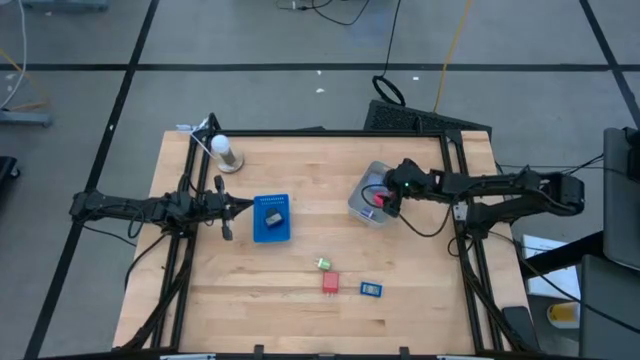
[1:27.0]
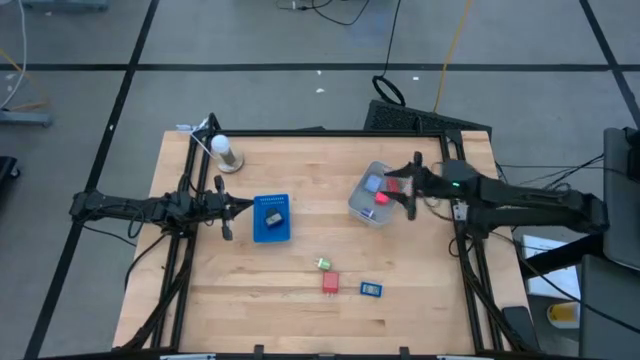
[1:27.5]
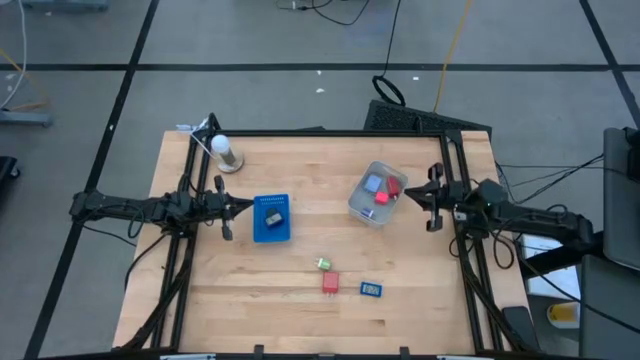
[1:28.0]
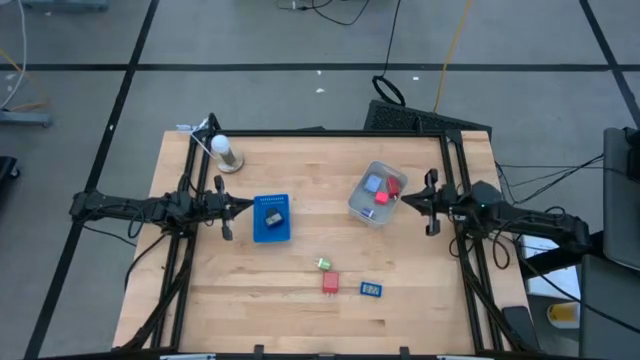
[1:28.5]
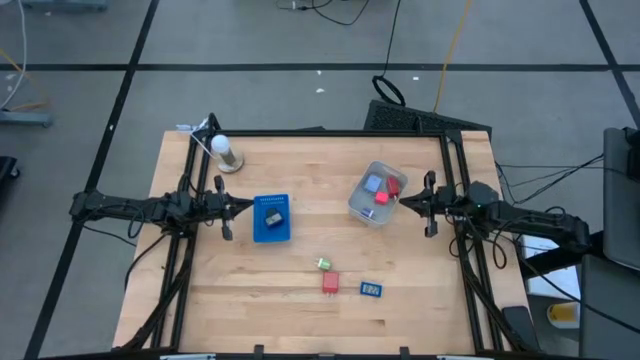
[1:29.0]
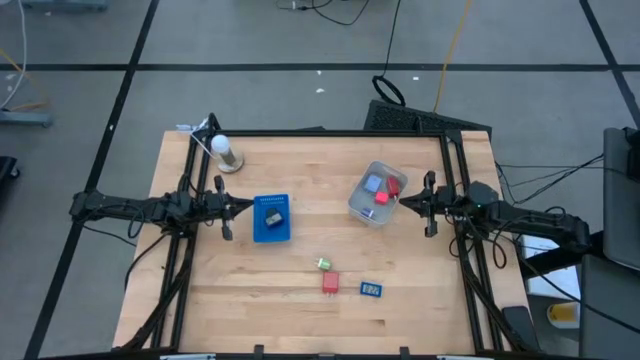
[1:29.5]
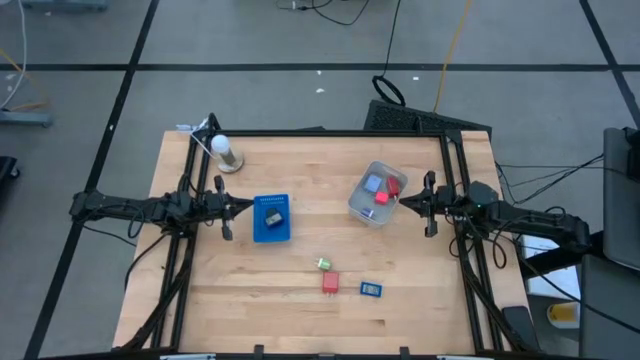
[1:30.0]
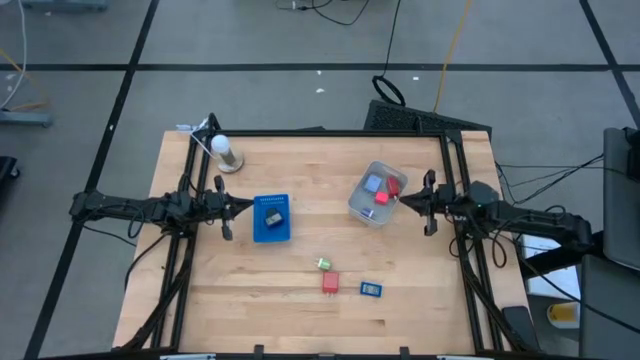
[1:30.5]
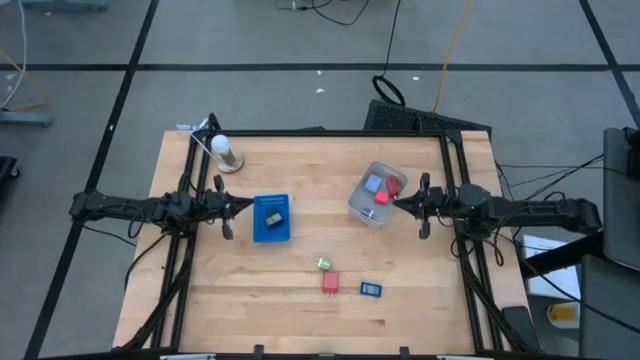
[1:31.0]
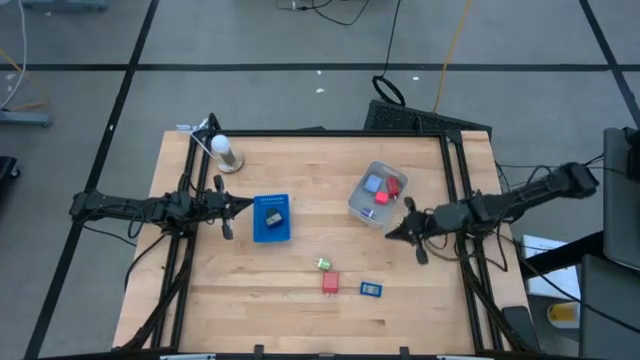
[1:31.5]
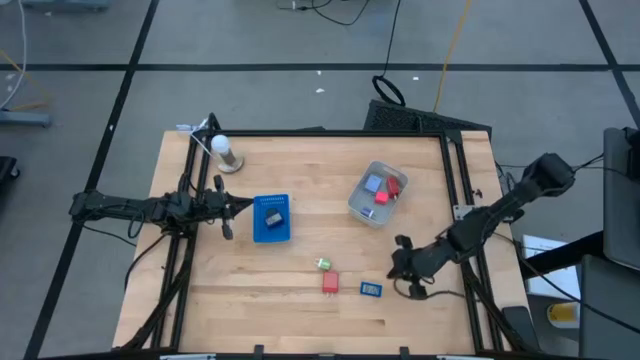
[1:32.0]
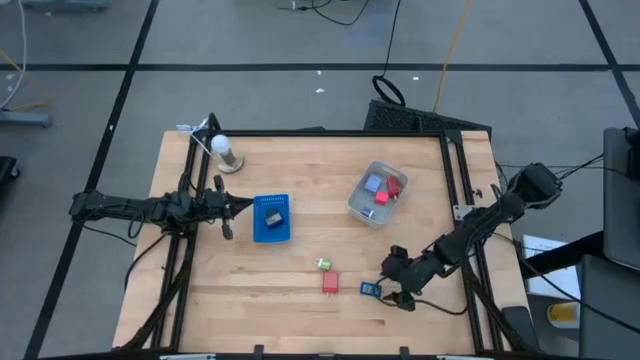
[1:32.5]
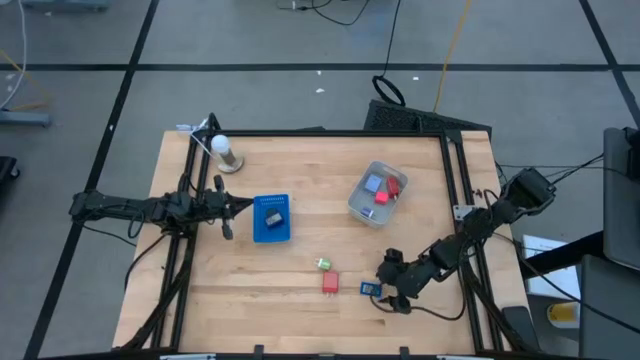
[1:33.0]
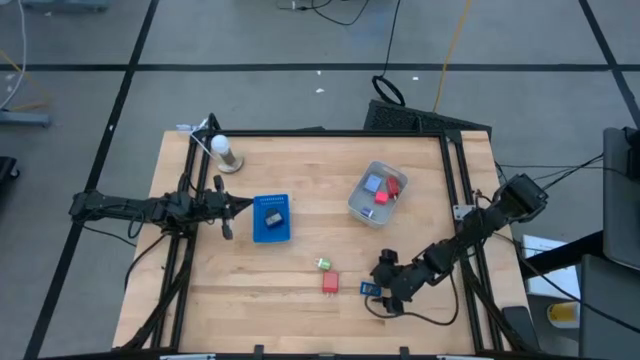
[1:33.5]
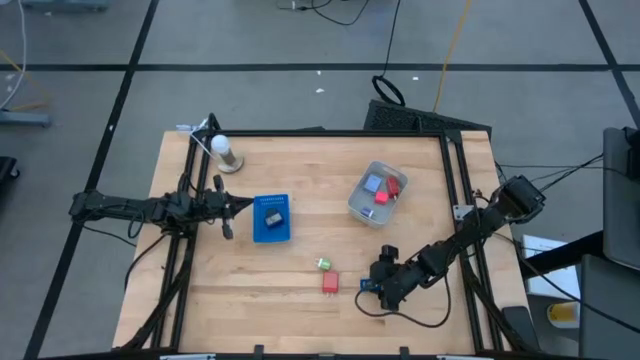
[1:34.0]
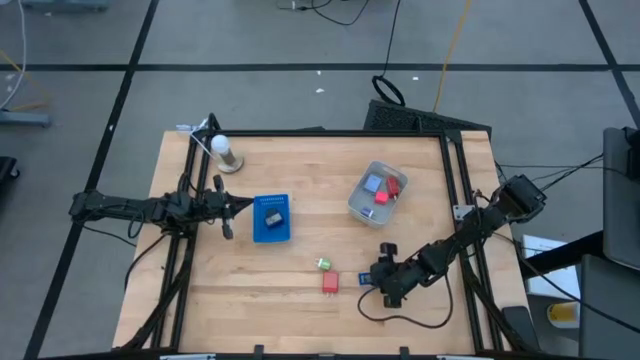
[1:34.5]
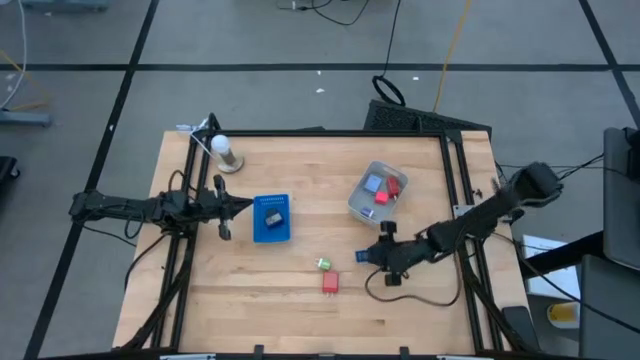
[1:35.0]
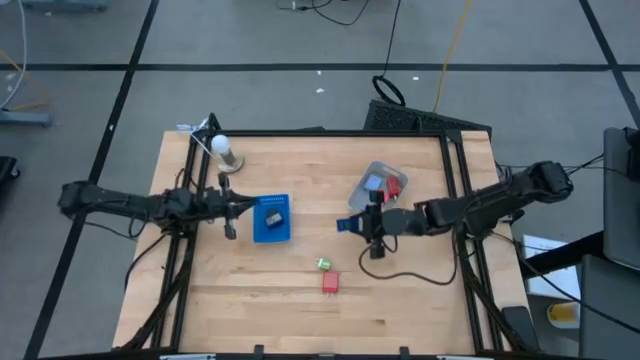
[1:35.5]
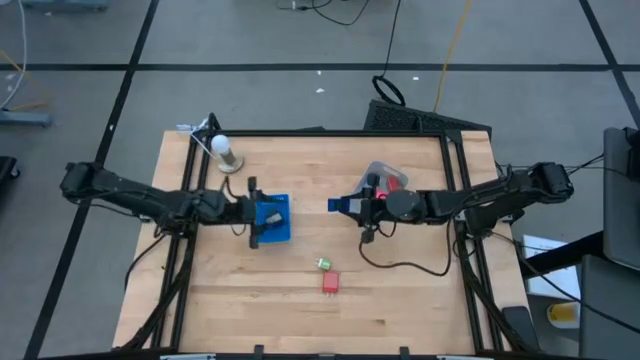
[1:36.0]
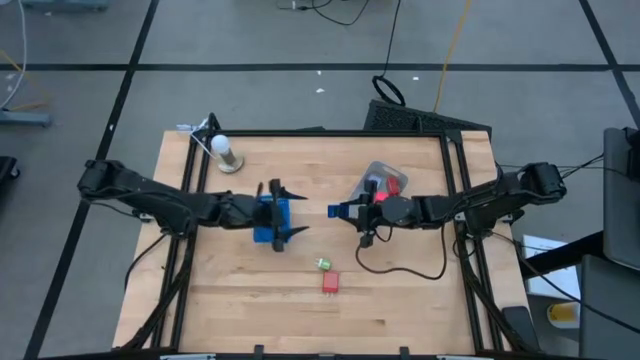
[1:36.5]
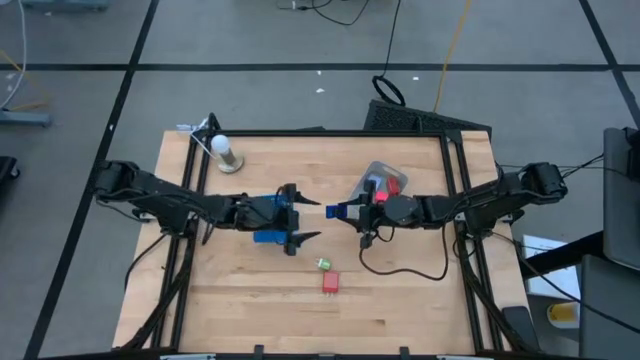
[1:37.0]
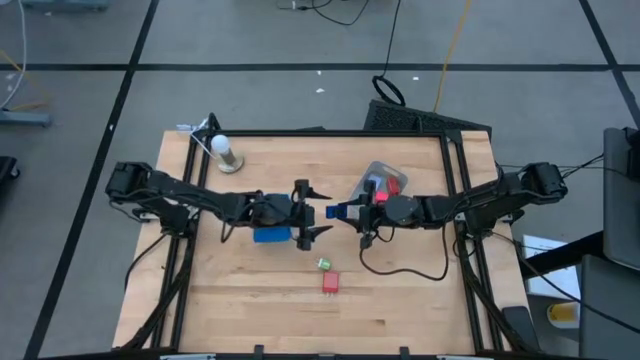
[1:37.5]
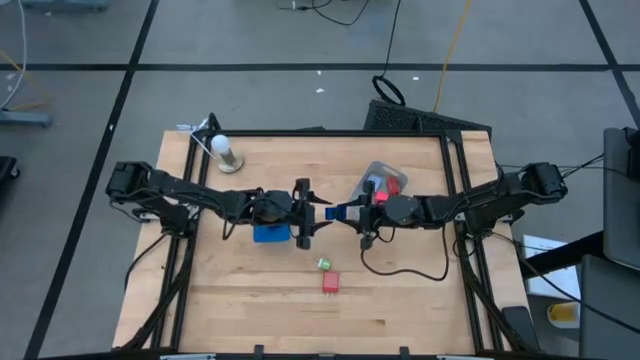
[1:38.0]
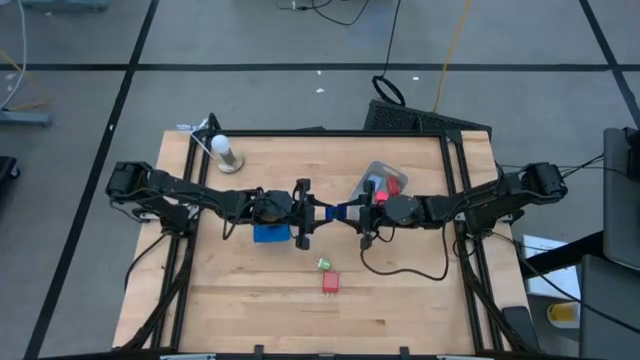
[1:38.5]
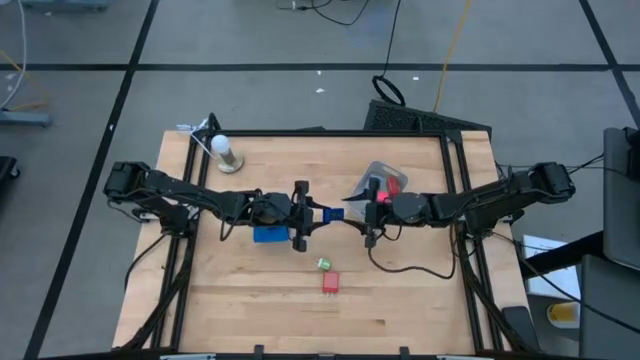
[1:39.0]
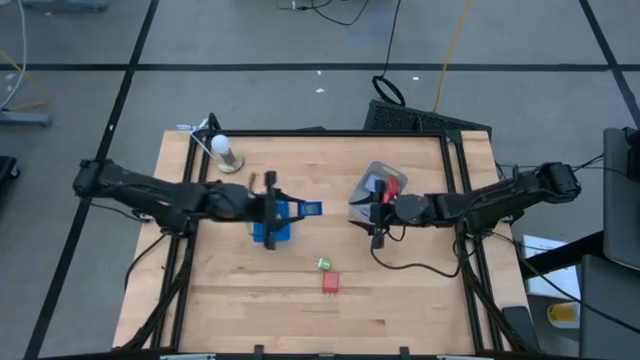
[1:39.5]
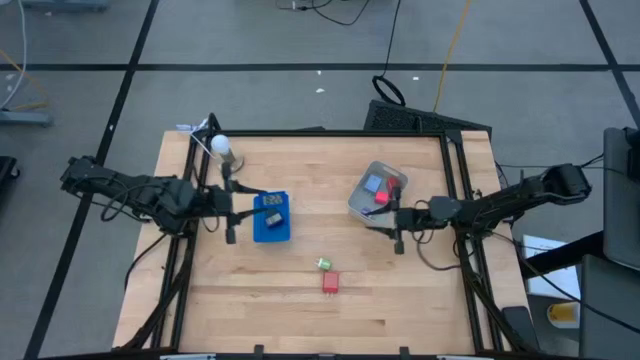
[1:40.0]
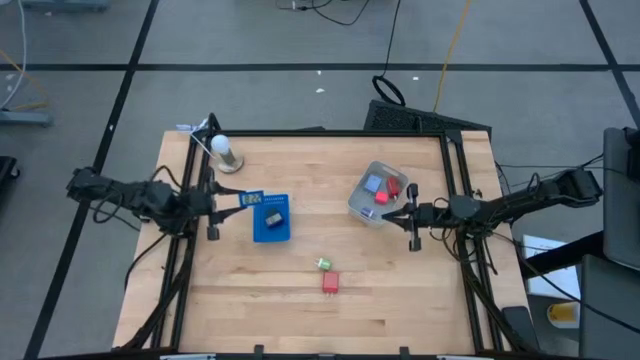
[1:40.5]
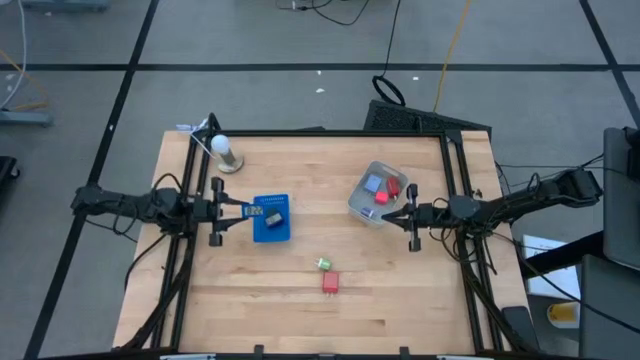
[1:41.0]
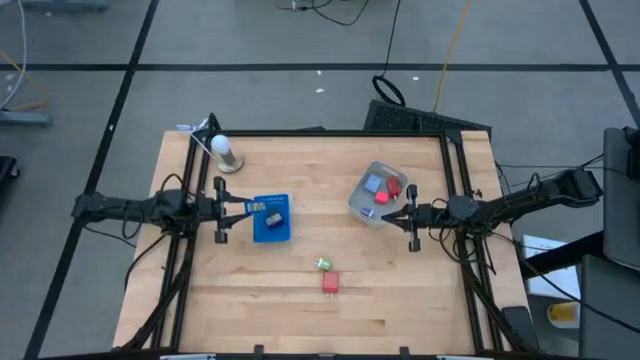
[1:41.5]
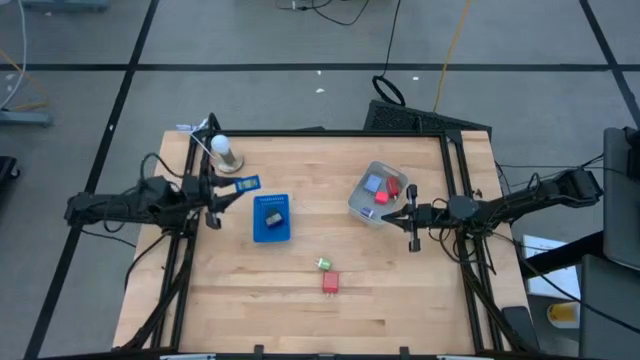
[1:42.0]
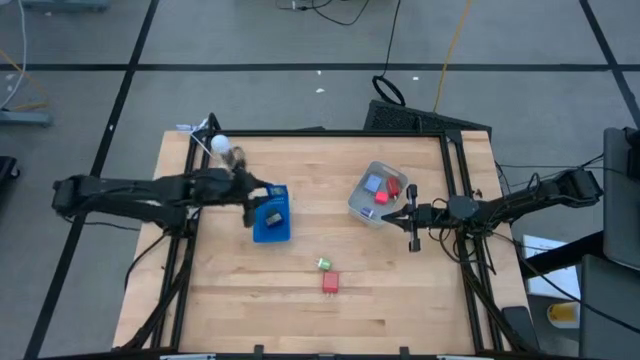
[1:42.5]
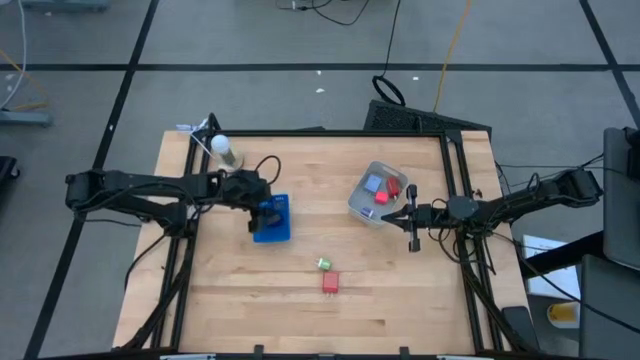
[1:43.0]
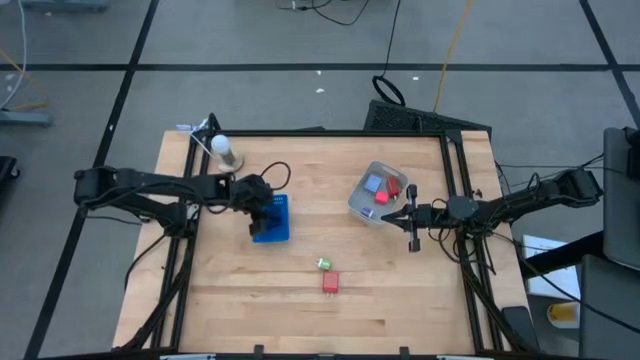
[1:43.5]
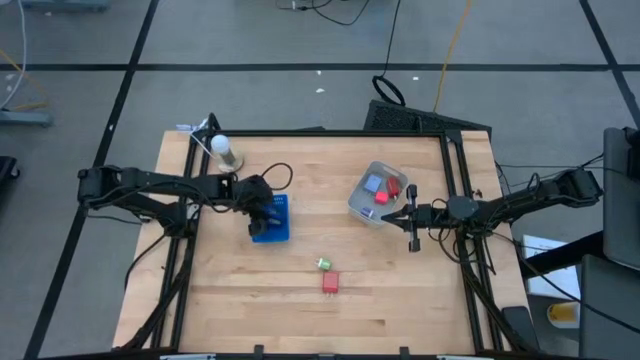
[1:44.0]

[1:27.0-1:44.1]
Task: Pick & Place Office items
Put the blue digital clock into the blue bin

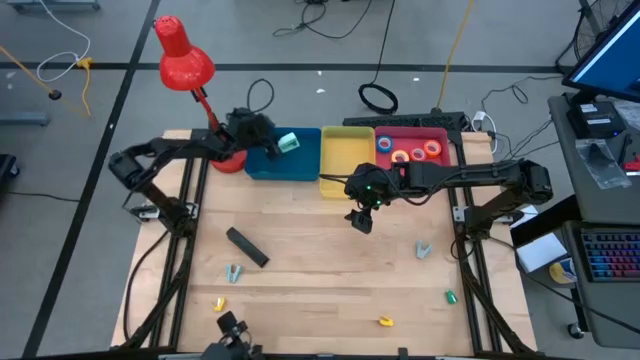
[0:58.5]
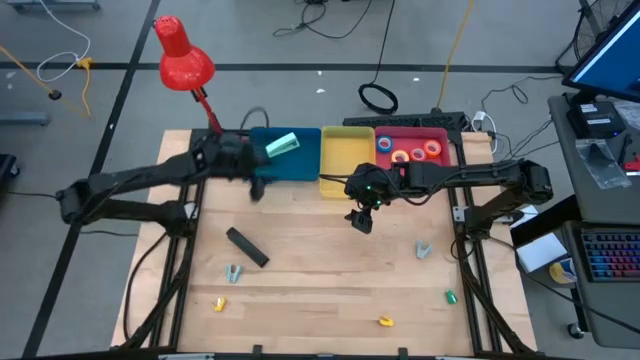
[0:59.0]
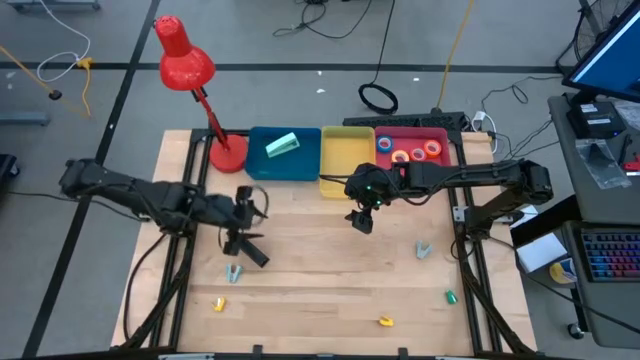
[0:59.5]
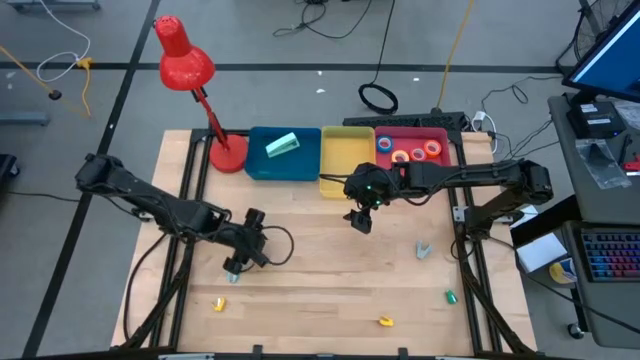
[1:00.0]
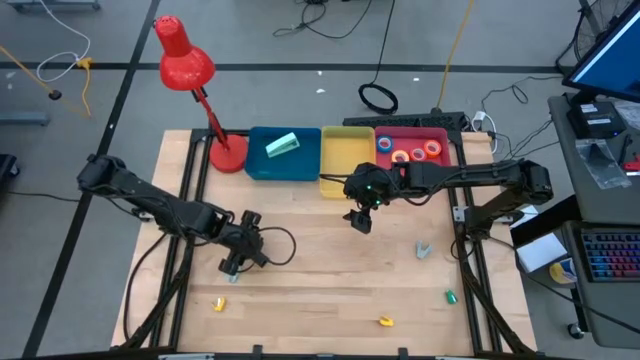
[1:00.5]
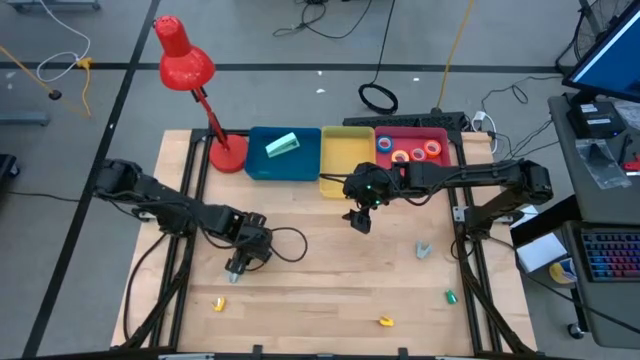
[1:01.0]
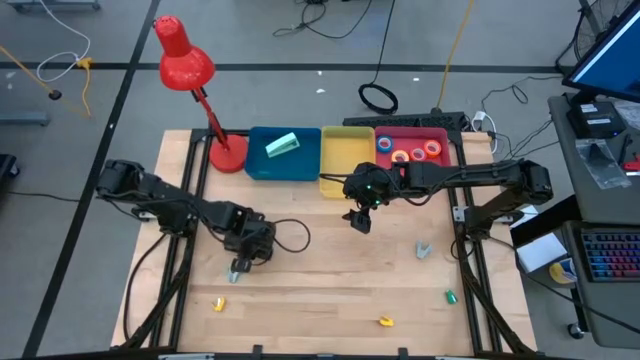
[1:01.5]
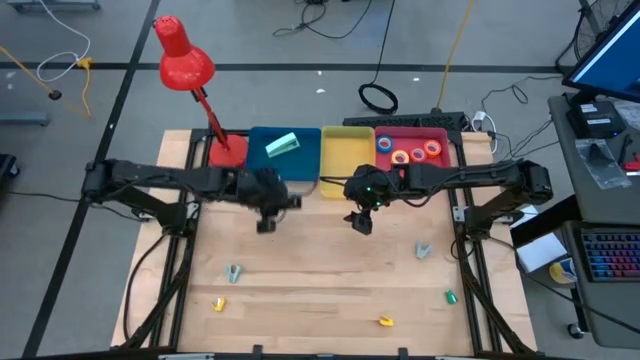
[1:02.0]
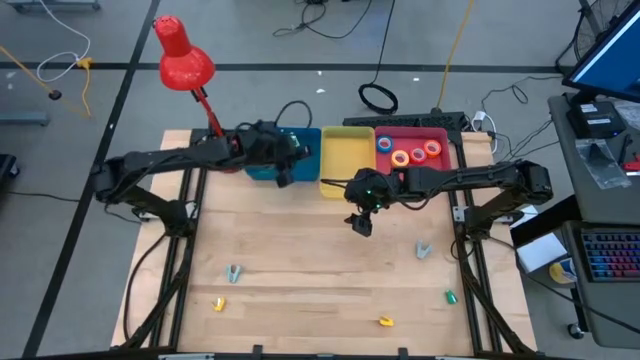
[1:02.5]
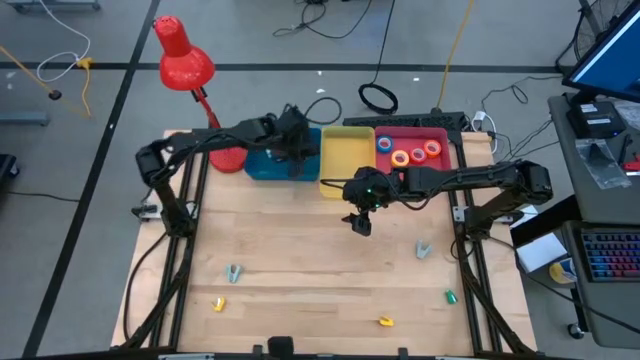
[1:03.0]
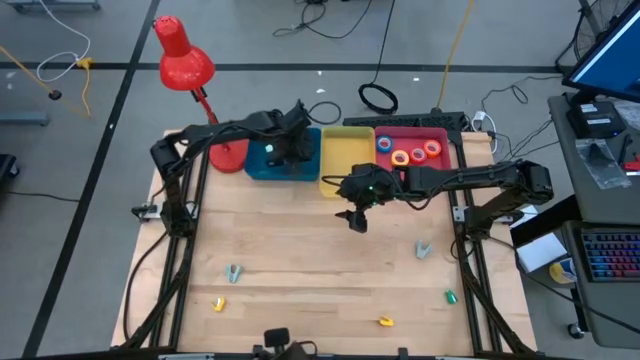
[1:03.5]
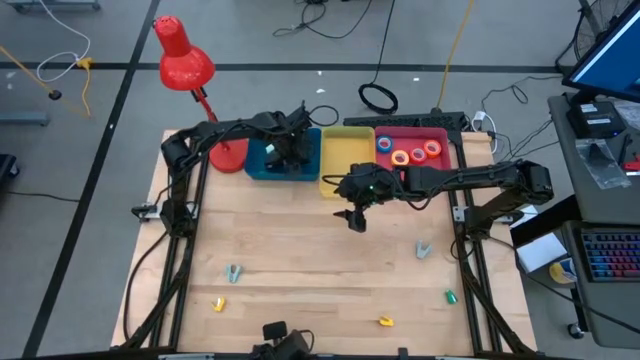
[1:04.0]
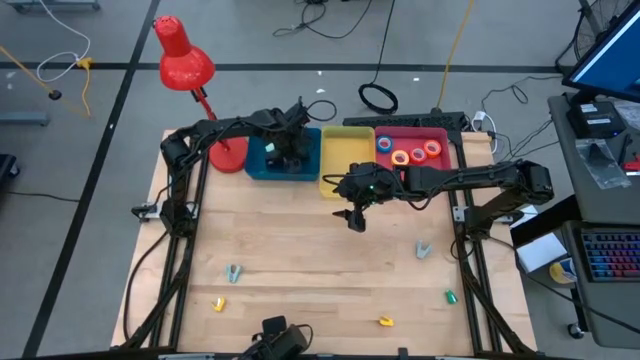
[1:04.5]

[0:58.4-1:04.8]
Task: Pick and place Stapler, Stapler remover, tape
Put the large black stapler into the blue bin
